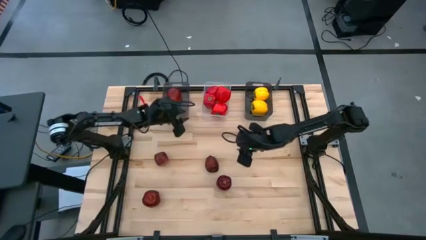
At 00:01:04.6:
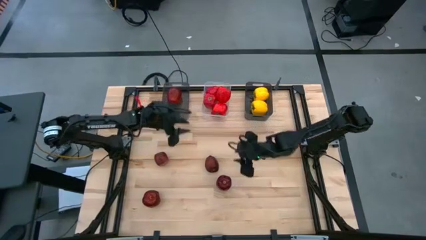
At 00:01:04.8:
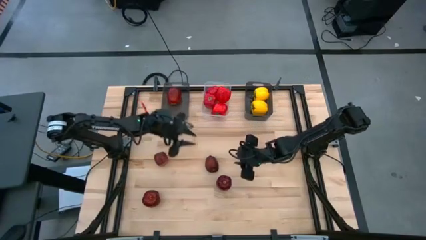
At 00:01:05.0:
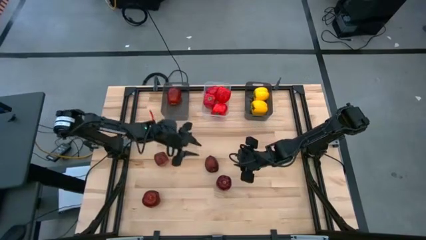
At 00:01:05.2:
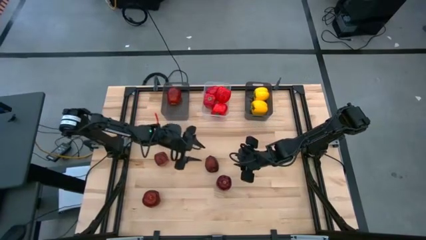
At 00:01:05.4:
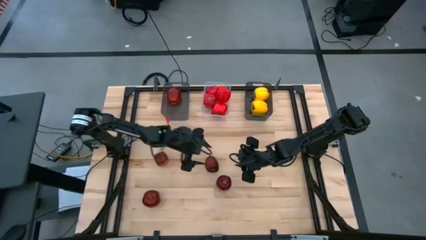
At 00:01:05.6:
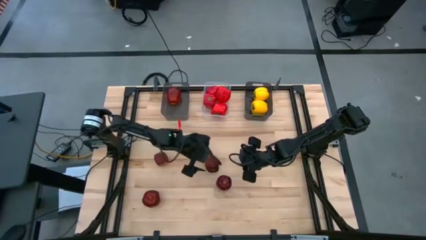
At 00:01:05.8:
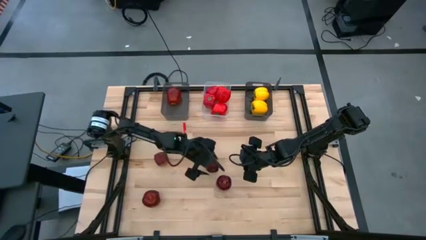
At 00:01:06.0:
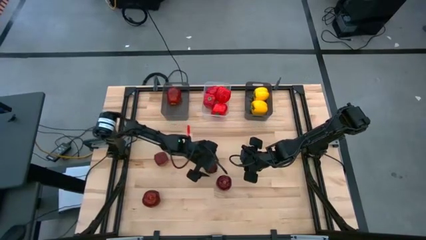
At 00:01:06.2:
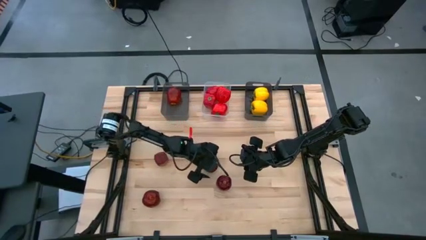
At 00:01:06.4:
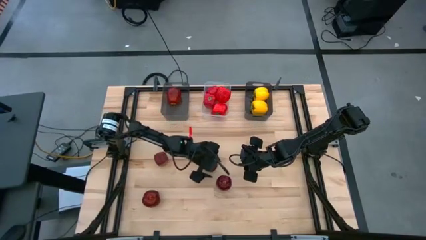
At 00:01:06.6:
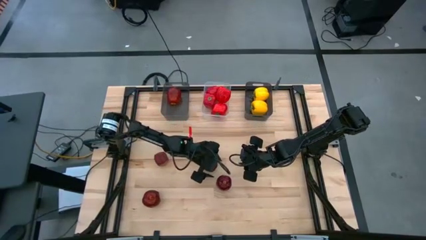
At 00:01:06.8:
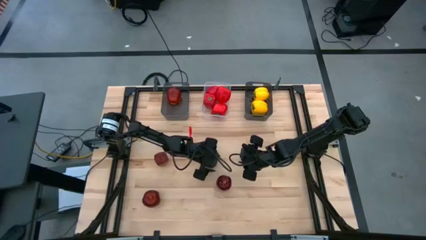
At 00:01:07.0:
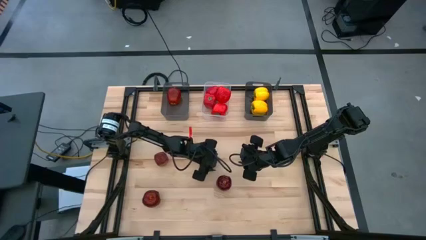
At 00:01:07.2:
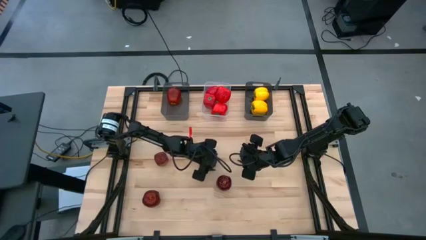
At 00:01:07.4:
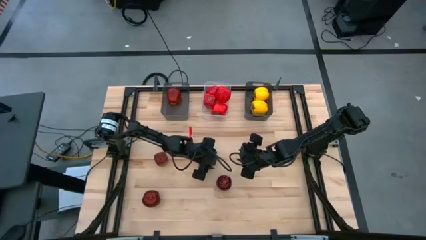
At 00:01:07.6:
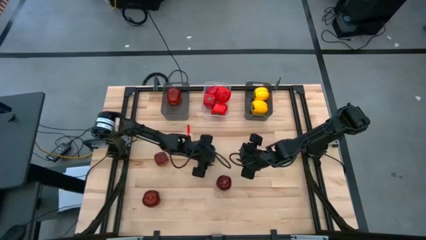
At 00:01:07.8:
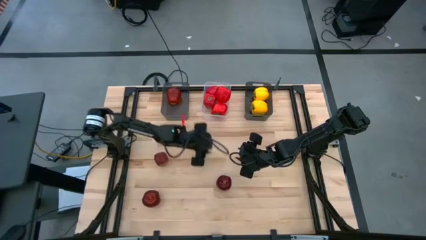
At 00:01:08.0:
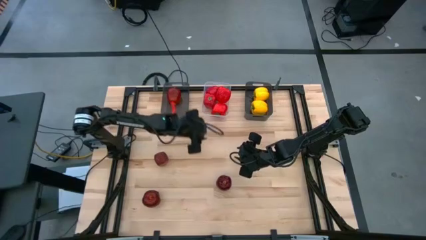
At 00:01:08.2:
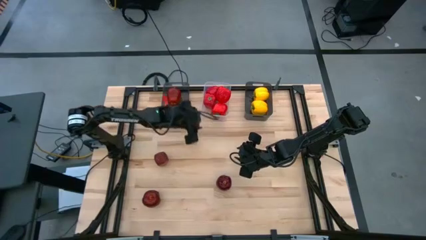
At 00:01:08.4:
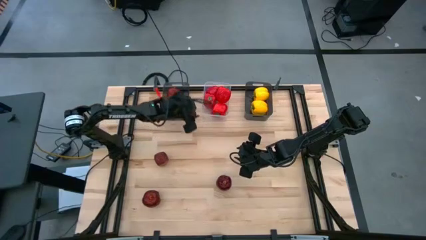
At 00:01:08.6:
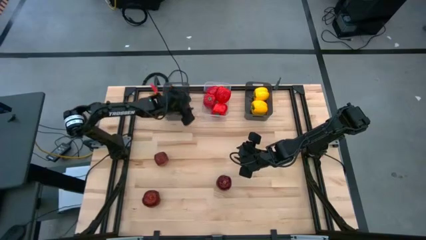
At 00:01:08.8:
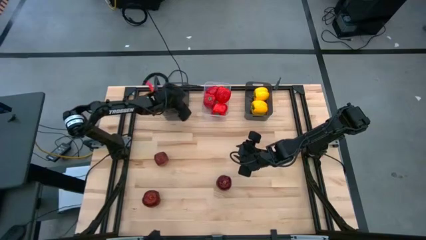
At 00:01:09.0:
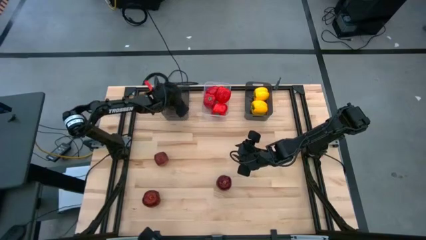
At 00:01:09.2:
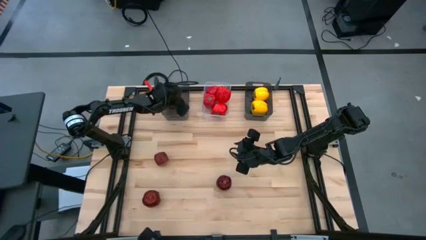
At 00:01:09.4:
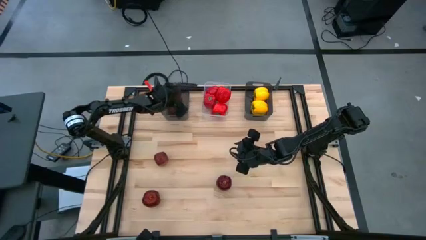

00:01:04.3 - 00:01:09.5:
Task: Sort produce into baskets
Put the top right apple into the left black transparent bin

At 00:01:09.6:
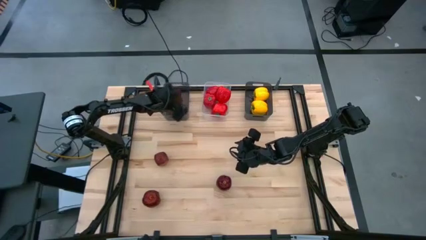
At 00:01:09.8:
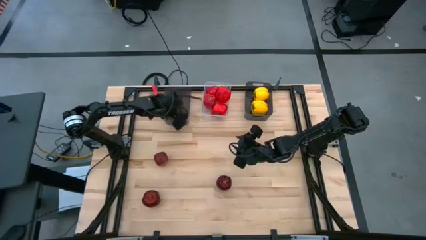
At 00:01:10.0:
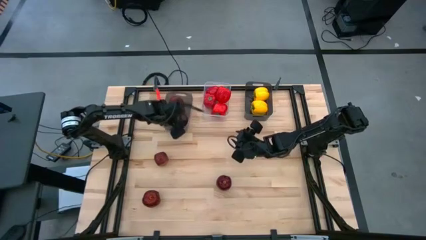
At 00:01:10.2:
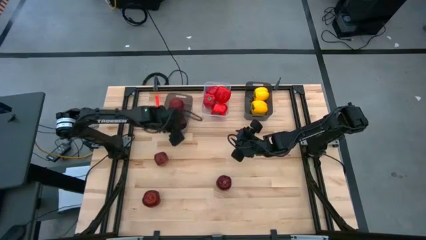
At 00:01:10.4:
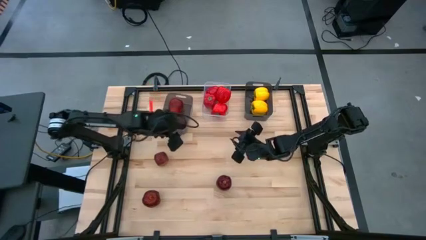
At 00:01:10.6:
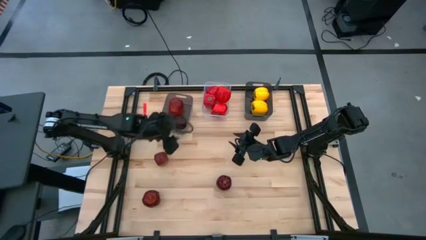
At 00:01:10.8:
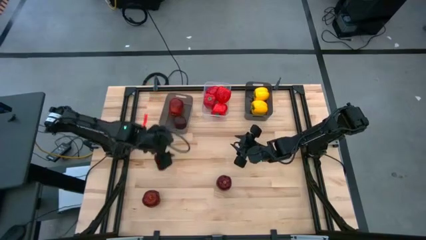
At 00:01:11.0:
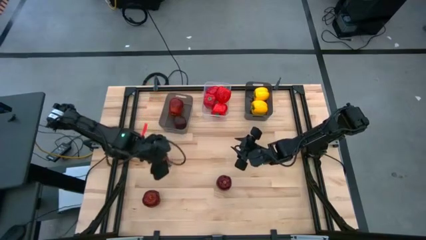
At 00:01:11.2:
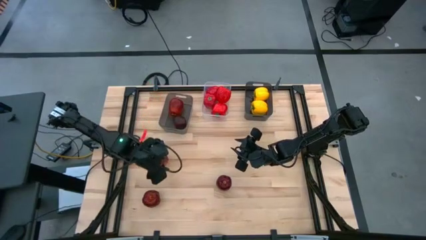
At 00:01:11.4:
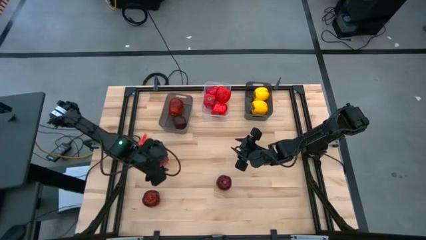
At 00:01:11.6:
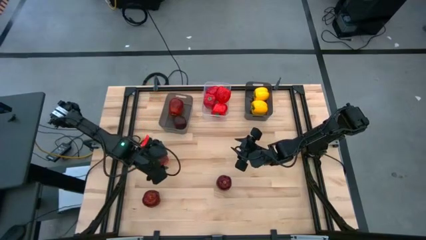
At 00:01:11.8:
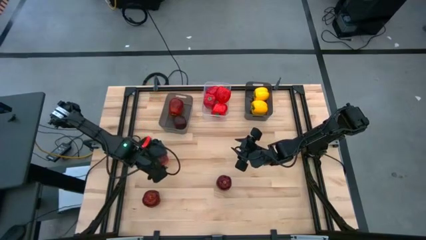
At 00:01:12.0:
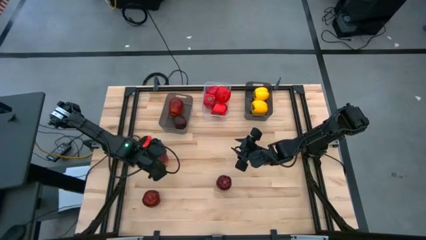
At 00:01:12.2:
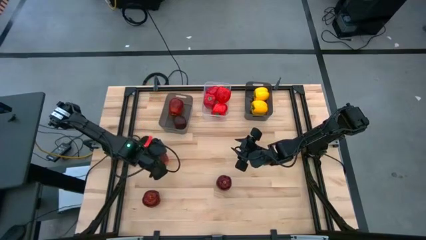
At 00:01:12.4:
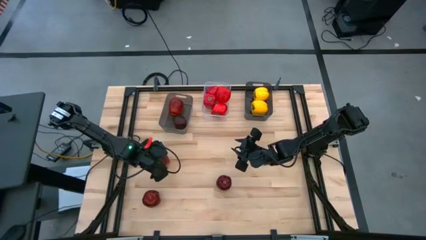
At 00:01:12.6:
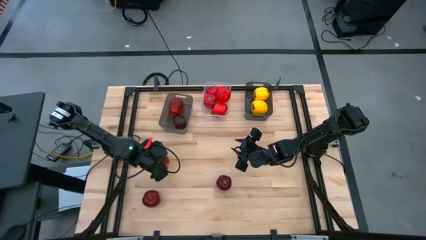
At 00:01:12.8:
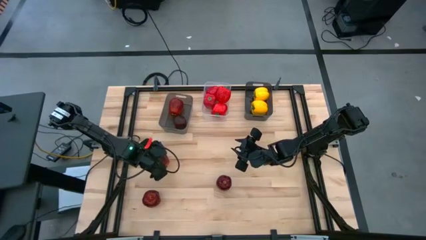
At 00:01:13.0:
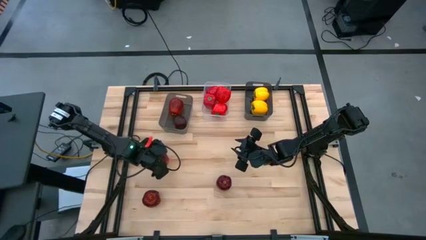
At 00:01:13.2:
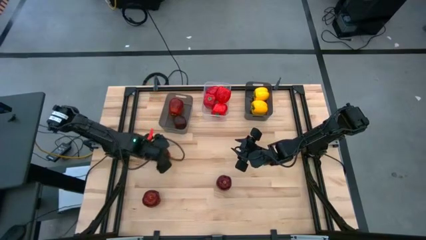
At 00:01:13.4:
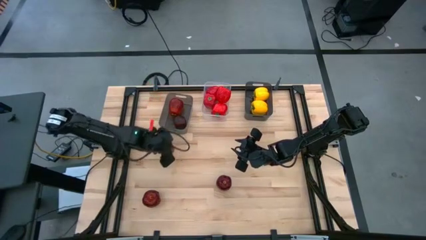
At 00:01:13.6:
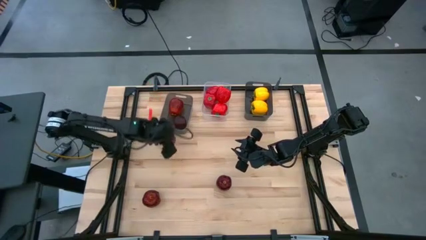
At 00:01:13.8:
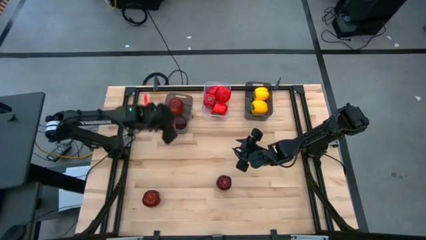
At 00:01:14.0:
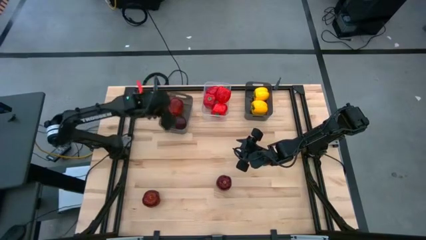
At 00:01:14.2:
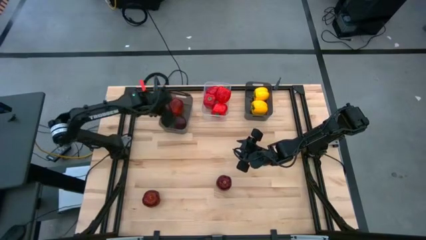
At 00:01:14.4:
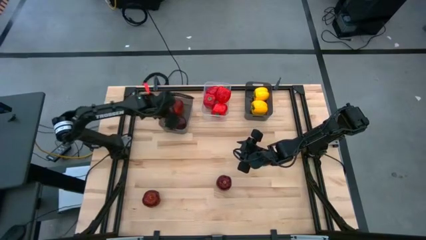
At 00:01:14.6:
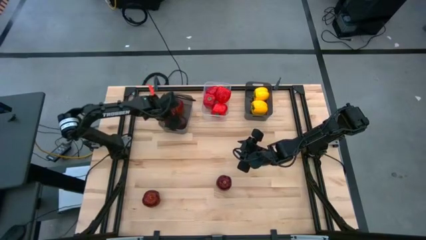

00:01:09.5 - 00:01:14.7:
Put the top apple into the left black transparent bin

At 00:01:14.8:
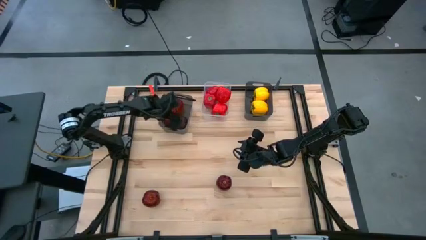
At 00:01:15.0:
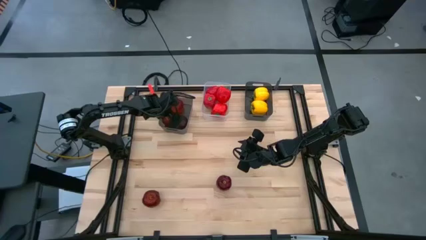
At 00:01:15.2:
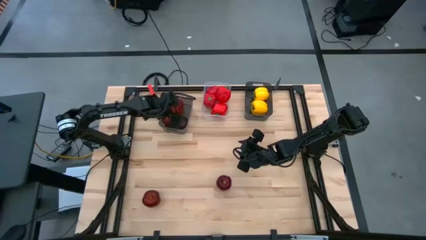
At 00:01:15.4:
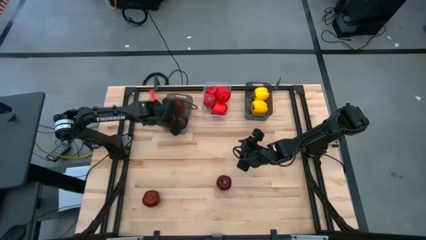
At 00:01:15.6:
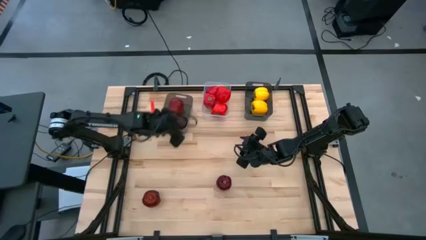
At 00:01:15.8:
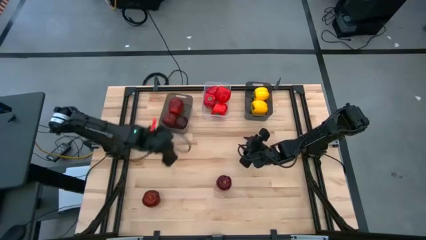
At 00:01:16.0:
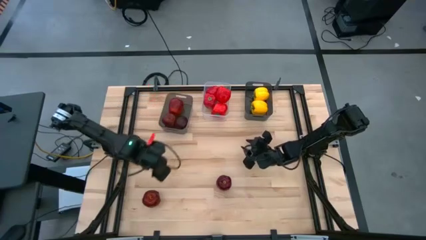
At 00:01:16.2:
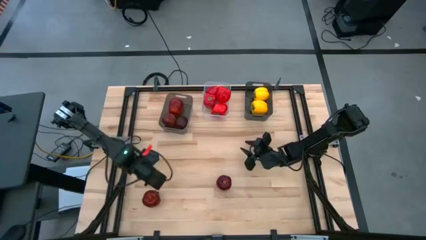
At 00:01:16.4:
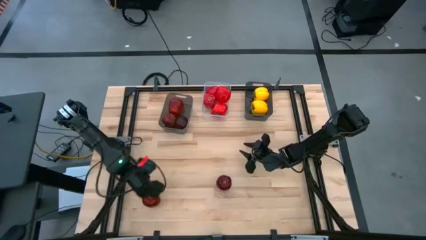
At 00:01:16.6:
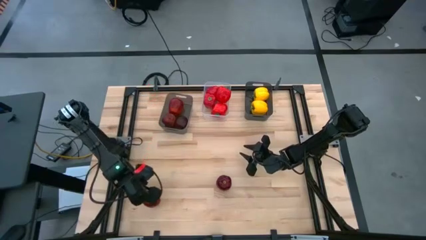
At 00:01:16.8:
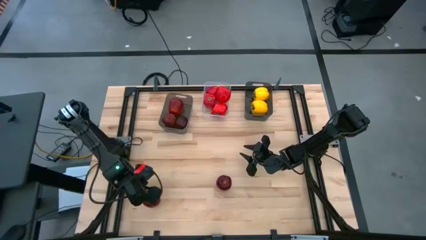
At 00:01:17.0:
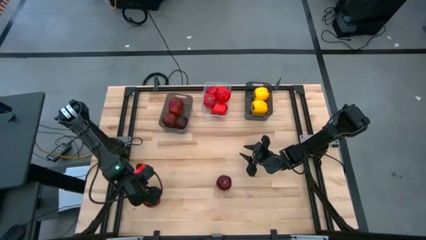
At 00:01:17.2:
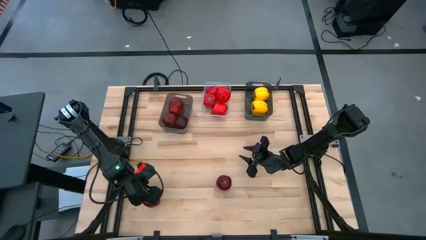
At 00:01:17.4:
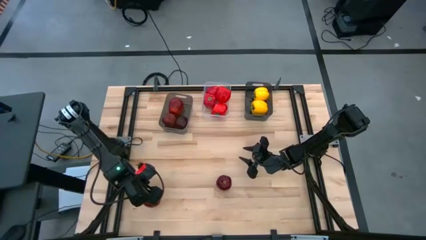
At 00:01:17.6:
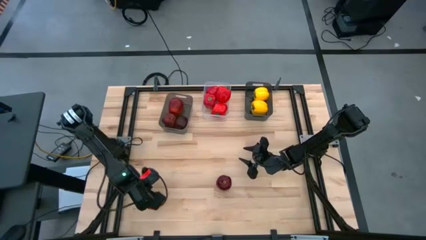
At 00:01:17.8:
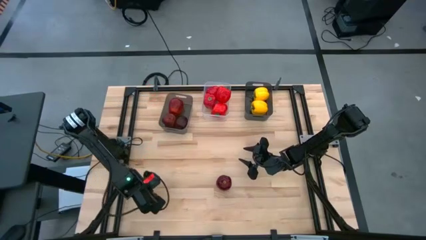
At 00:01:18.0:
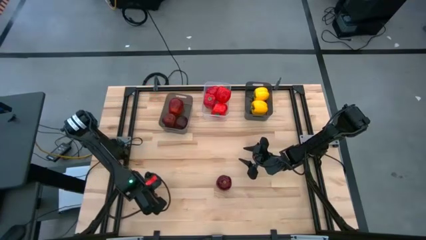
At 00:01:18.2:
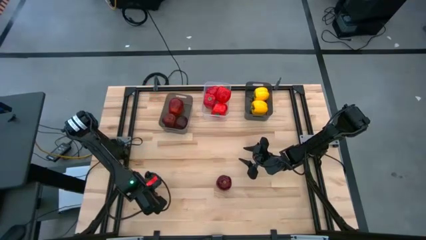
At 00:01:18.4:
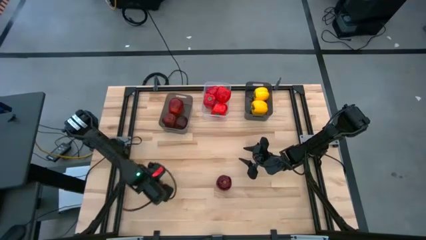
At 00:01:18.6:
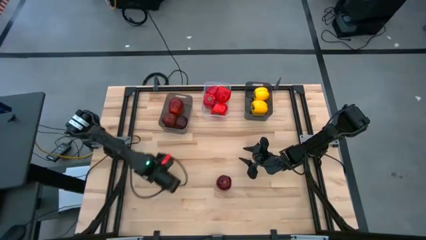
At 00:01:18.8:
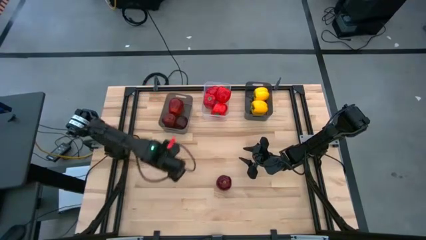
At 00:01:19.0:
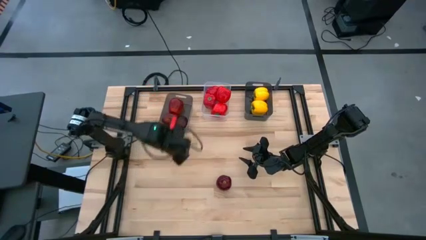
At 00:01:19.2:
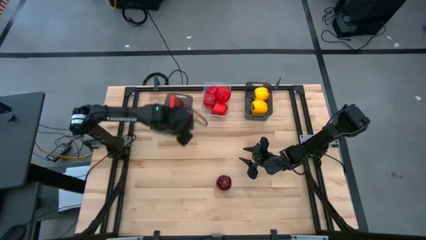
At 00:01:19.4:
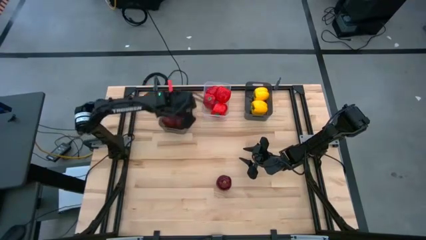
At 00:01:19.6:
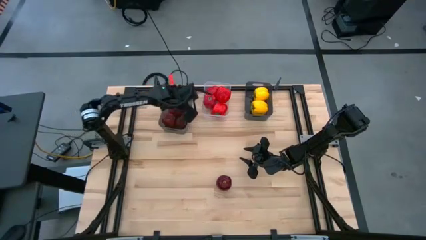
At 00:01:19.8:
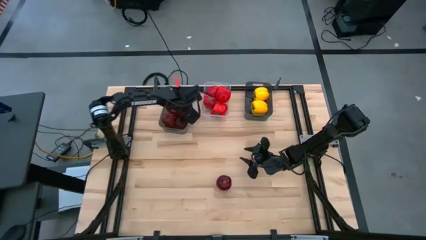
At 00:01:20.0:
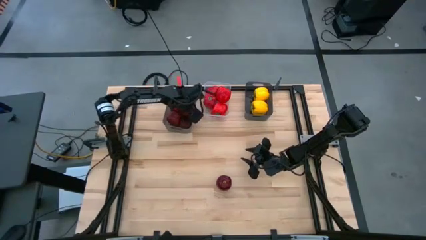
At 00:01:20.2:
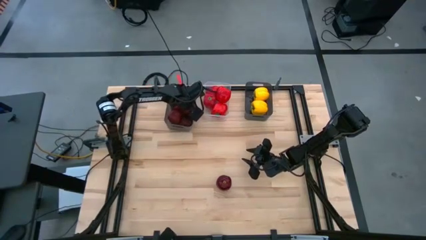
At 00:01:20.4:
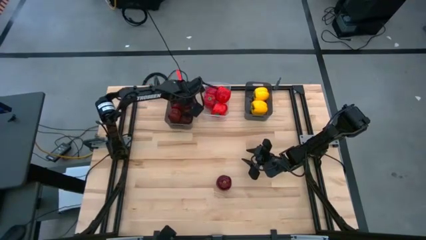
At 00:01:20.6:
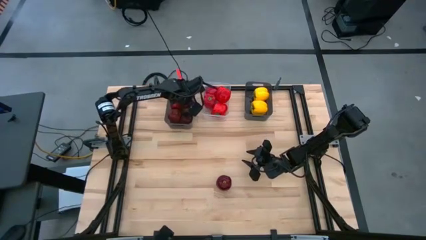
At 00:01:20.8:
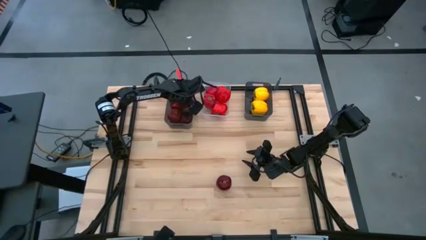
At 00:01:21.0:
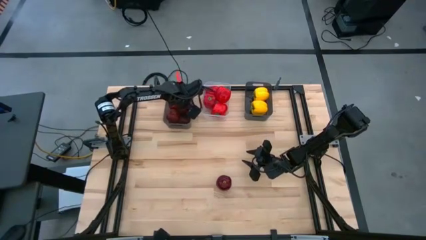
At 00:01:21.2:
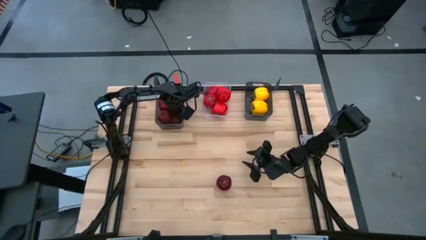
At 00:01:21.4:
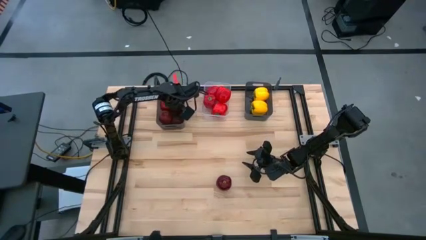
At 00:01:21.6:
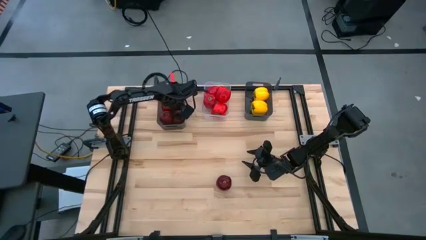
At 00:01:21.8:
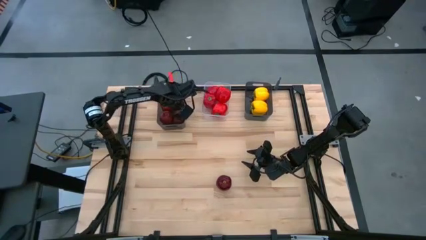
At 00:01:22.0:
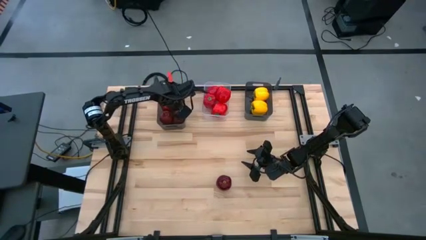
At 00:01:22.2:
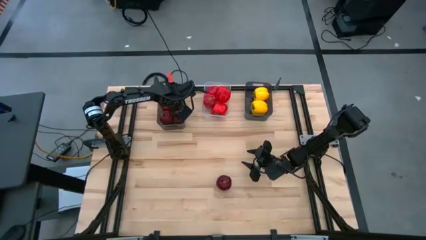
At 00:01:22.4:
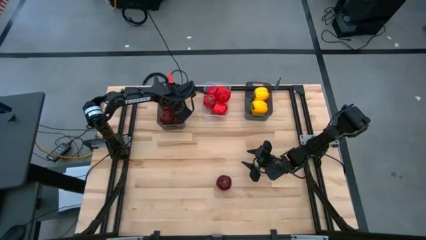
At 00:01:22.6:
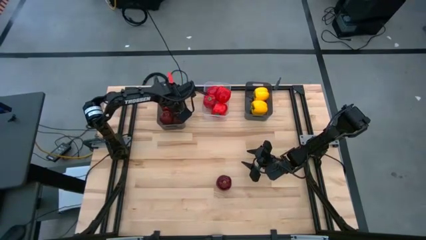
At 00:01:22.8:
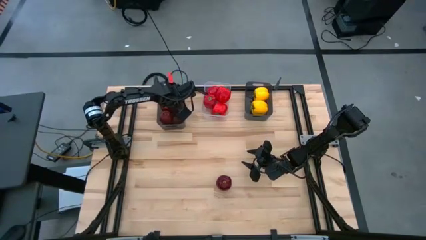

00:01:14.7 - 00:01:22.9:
Put the left apple into the left black transparent bin
